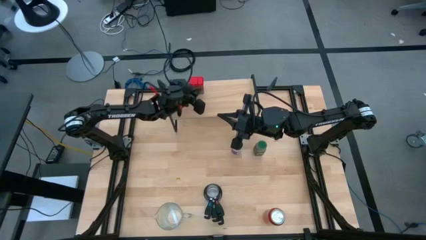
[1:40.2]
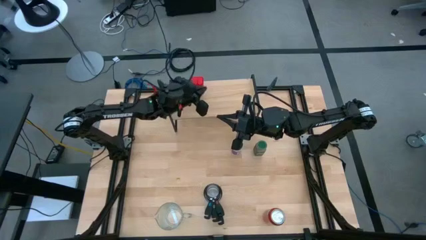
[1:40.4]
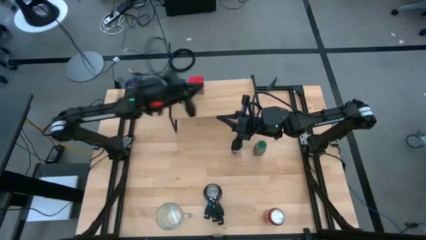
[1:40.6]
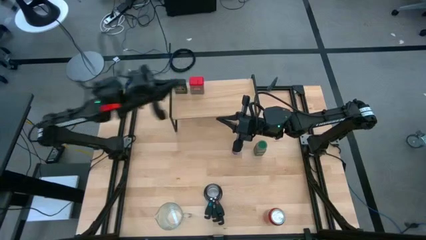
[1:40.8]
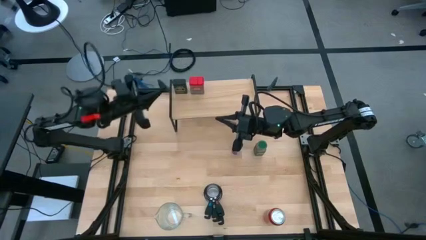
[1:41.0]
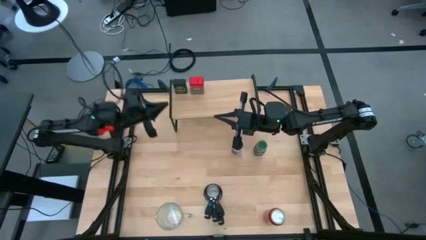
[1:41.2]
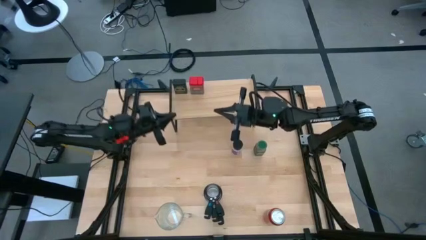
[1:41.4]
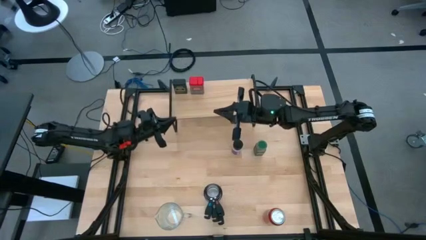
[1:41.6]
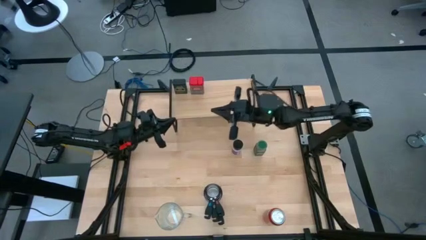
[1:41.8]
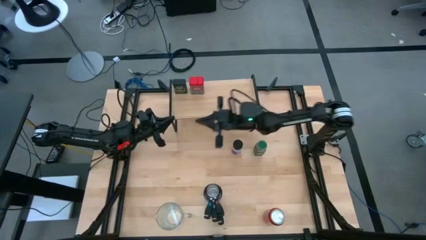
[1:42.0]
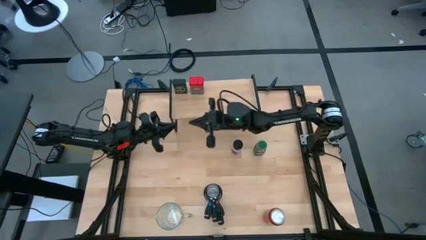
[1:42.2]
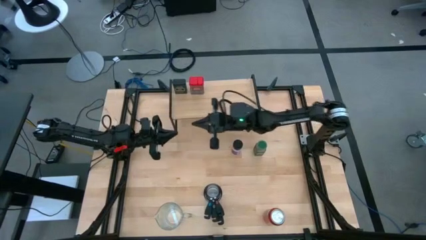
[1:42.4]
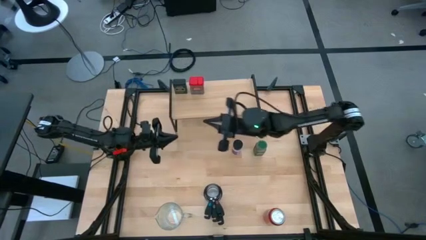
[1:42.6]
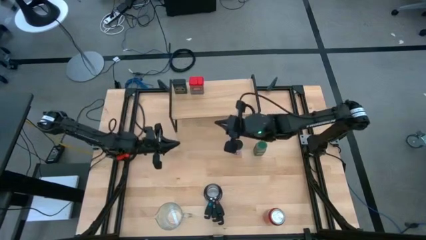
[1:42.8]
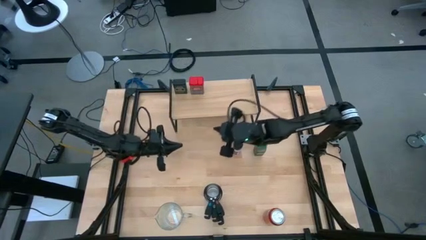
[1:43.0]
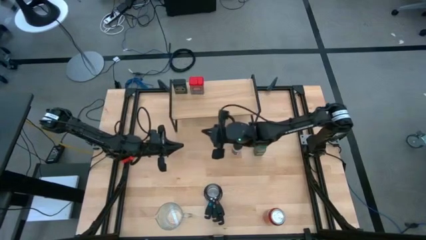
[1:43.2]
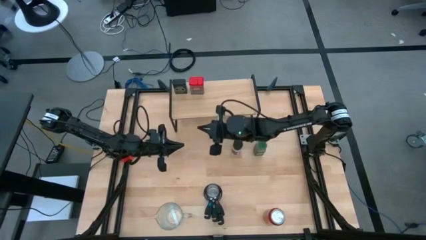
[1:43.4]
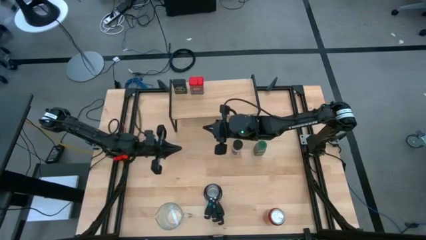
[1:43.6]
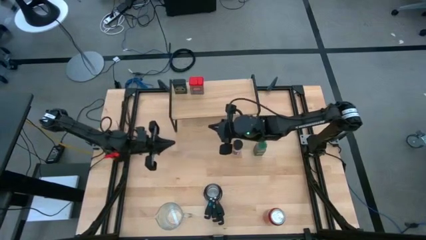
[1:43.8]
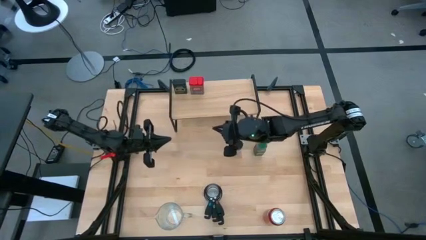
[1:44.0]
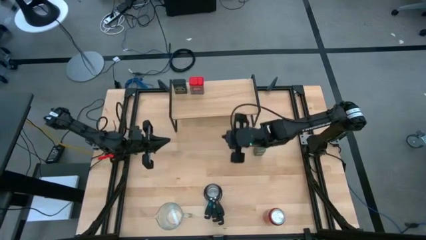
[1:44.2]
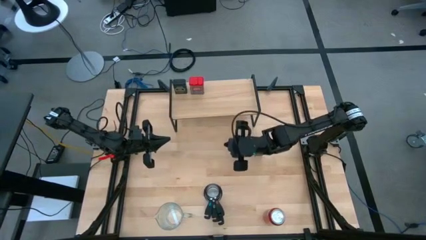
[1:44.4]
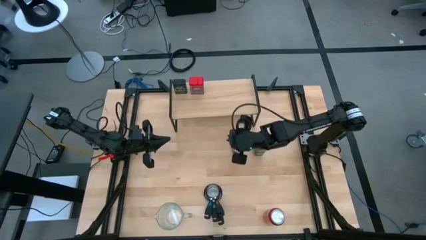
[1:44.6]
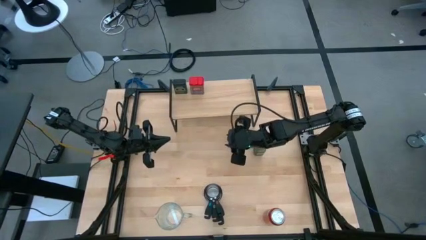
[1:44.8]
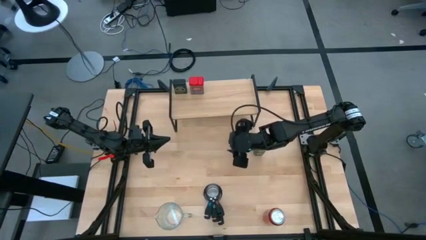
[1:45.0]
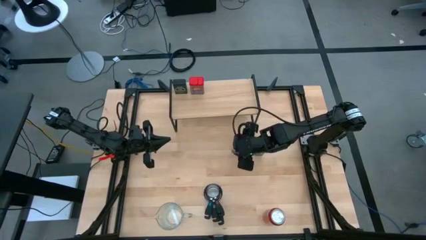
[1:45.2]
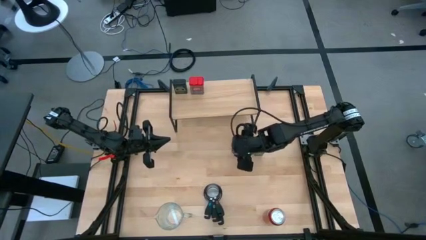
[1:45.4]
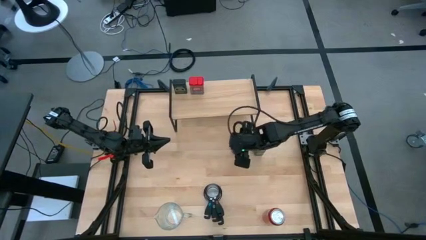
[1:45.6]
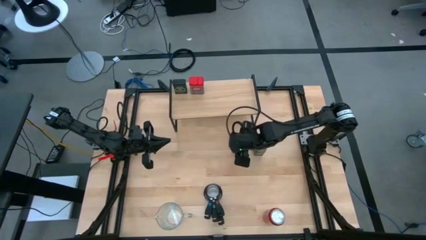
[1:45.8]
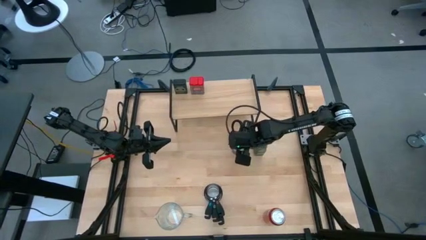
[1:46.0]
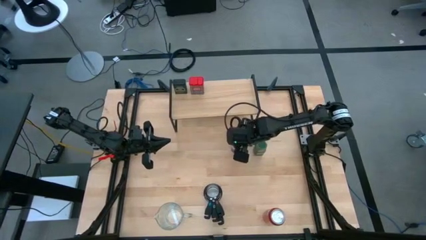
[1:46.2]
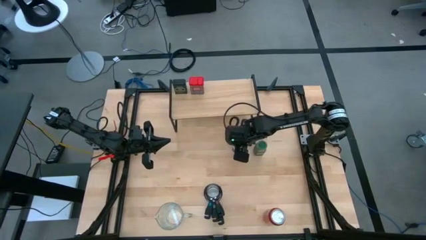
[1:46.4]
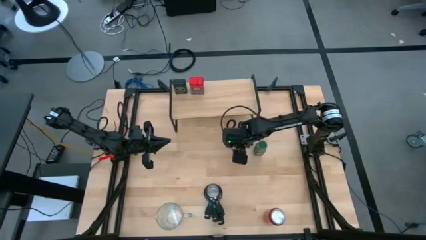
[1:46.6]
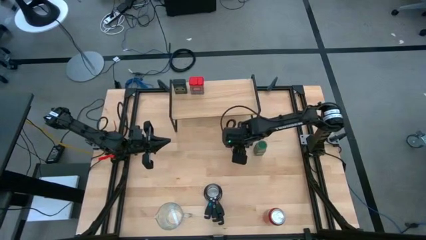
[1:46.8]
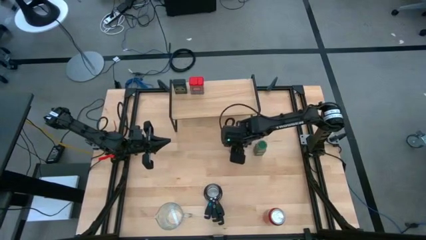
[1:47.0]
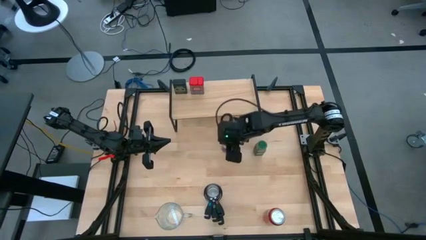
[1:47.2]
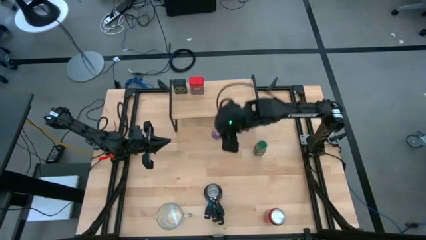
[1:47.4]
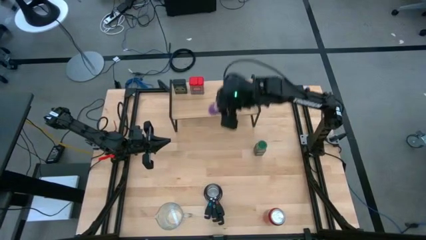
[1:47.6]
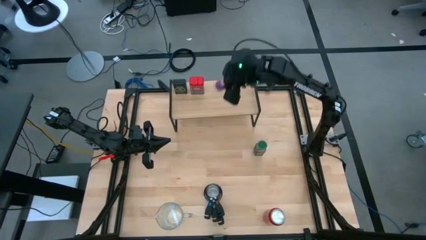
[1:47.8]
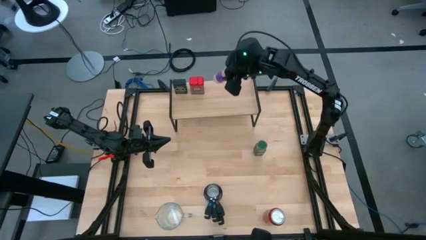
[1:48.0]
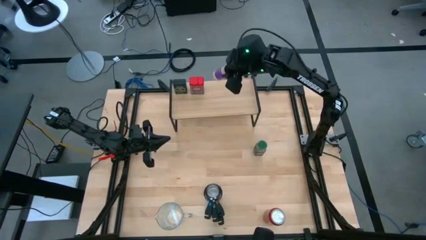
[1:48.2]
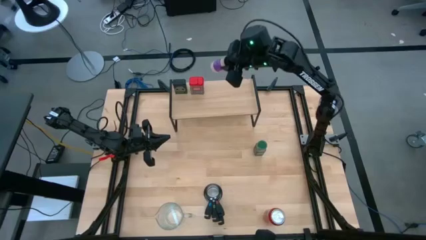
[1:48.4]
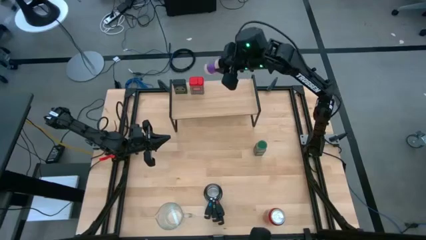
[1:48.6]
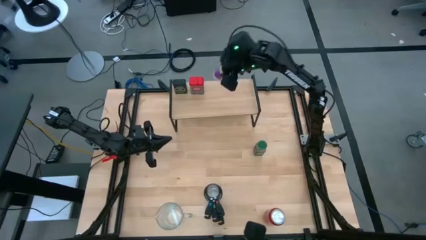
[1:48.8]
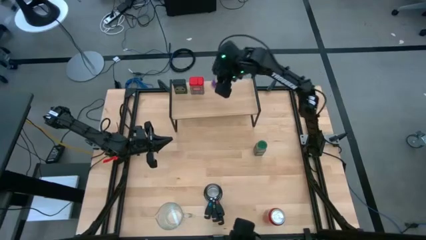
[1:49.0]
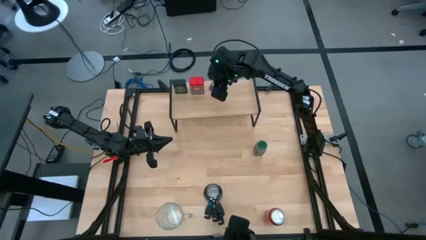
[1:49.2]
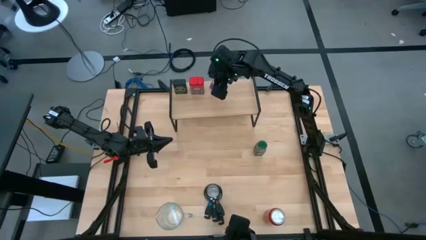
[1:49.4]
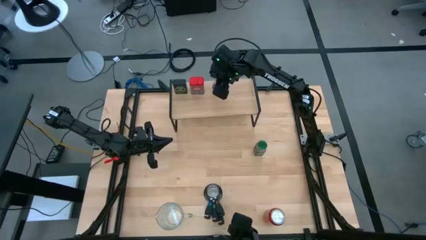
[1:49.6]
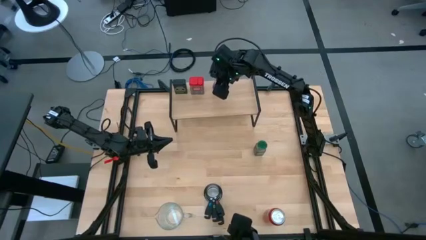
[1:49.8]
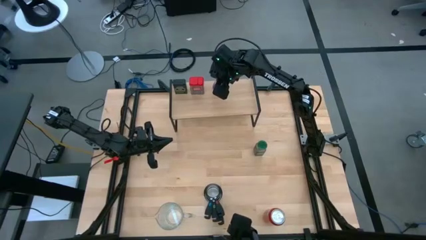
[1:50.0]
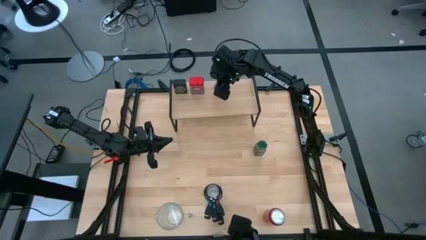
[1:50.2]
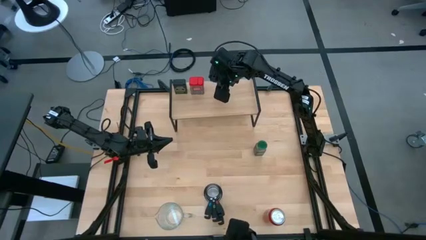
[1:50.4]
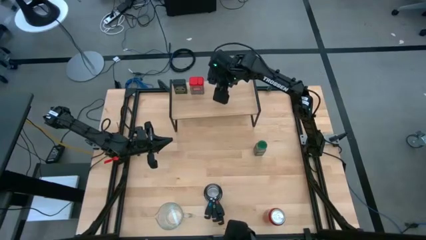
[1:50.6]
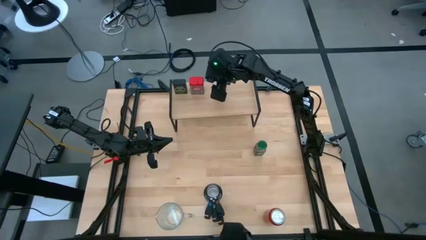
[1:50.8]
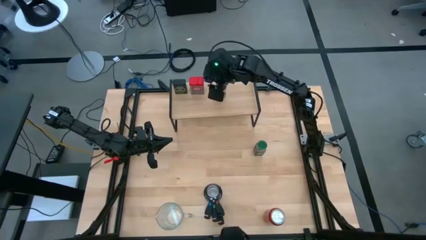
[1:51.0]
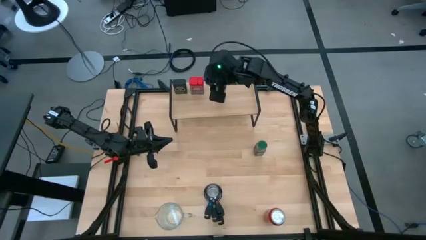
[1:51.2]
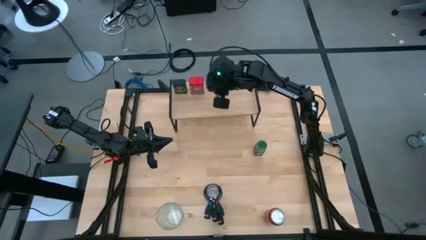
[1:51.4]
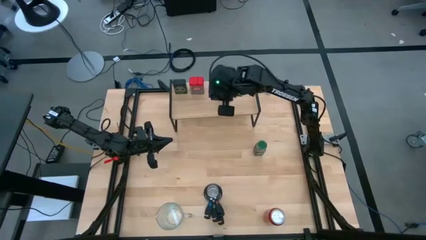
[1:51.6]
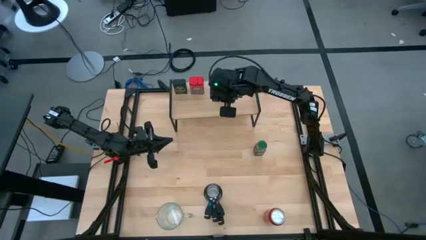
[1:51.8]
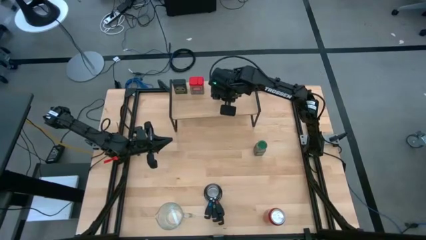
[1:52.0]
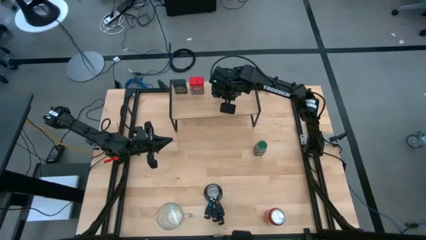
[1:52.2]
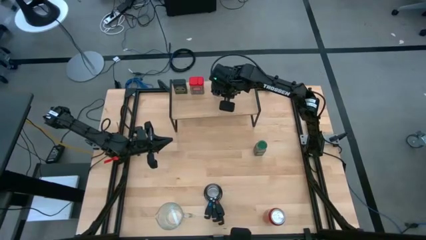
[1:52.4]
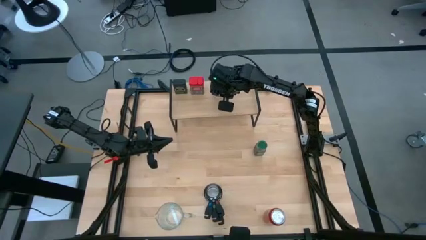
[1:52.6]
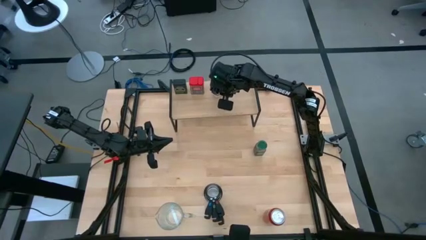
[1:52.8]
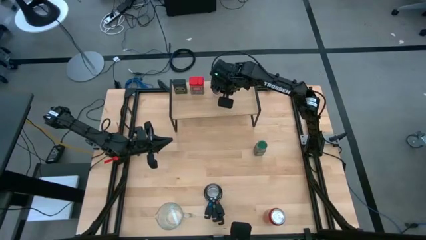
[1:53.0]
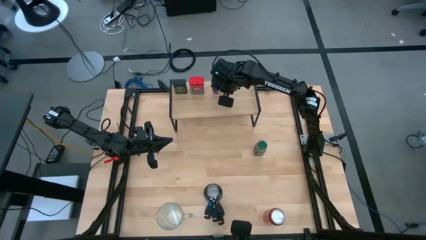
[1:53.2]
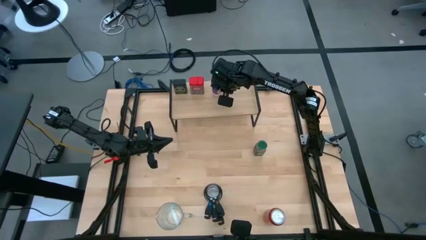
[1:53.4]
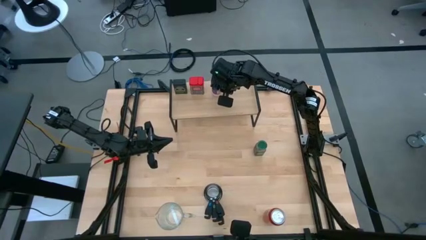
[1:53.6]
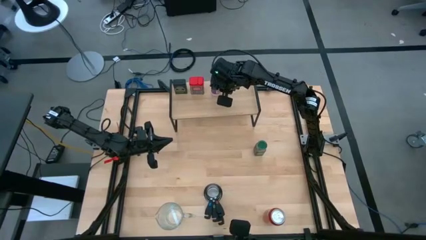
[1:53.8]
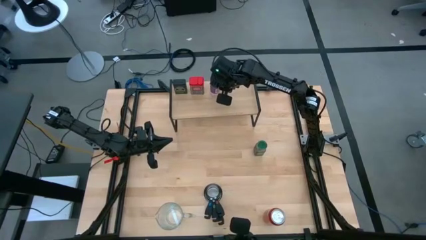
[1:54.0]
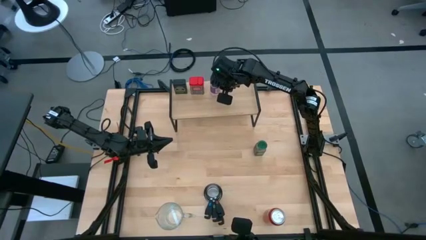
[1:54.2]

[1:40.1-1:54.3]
Task: Shelf spices
Put the black seasoning bottle on the shelf

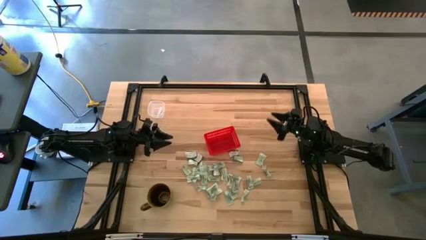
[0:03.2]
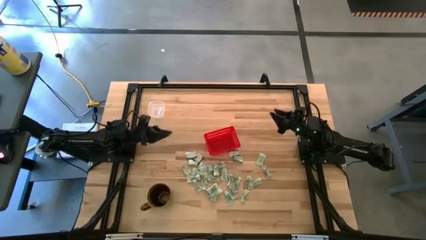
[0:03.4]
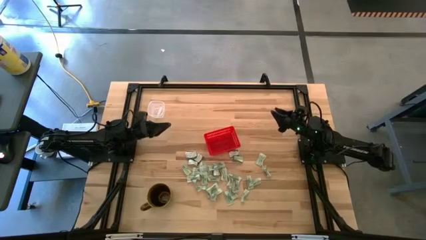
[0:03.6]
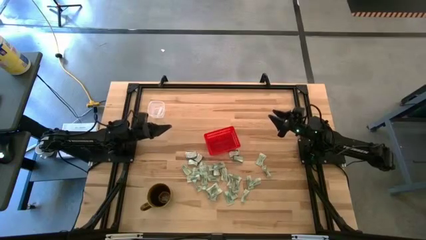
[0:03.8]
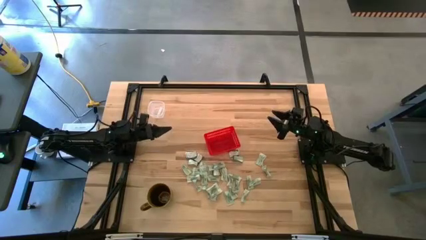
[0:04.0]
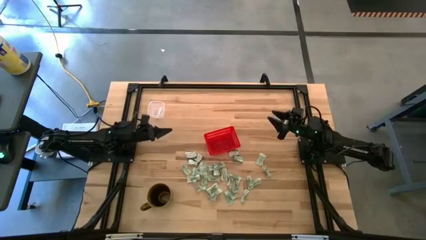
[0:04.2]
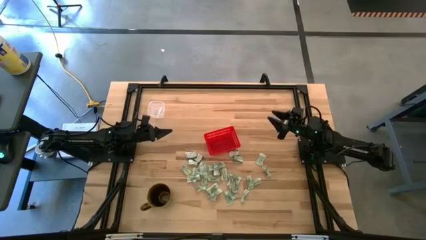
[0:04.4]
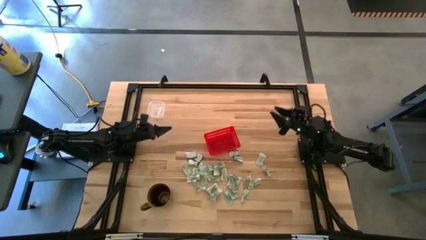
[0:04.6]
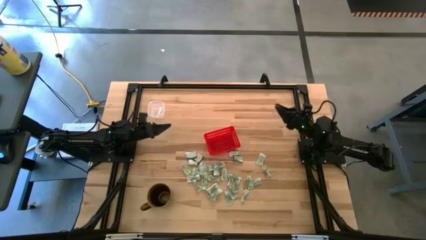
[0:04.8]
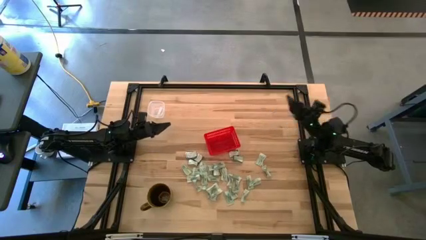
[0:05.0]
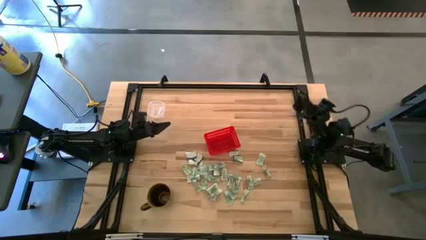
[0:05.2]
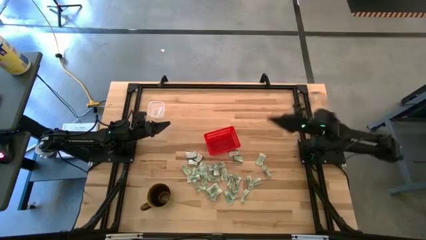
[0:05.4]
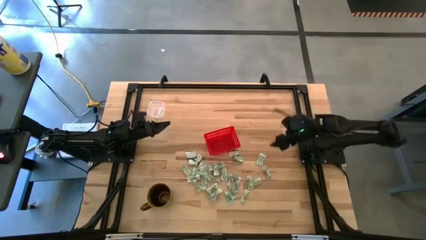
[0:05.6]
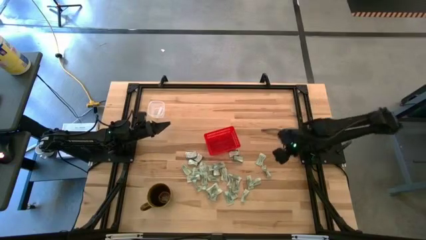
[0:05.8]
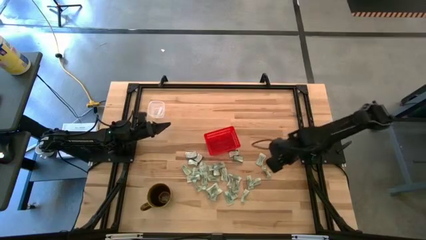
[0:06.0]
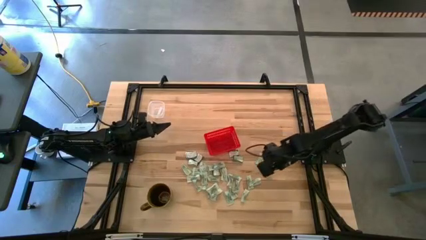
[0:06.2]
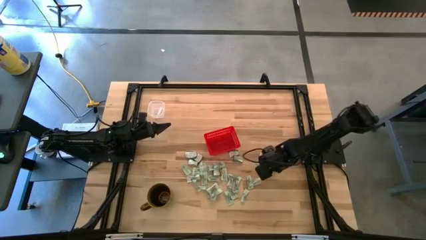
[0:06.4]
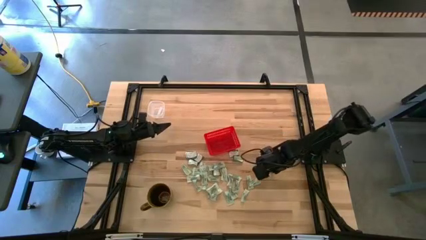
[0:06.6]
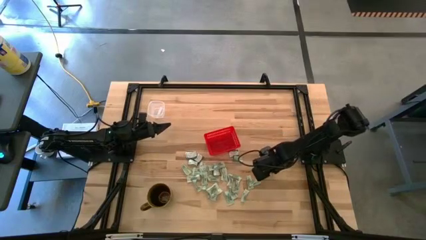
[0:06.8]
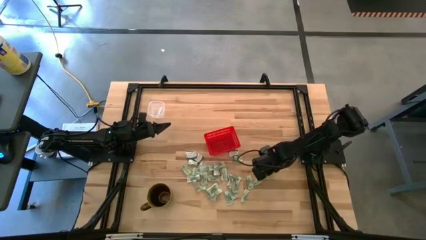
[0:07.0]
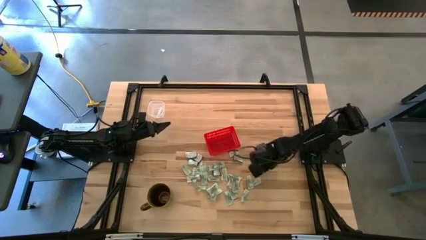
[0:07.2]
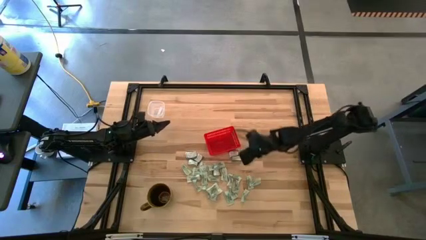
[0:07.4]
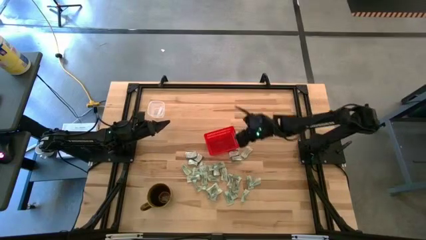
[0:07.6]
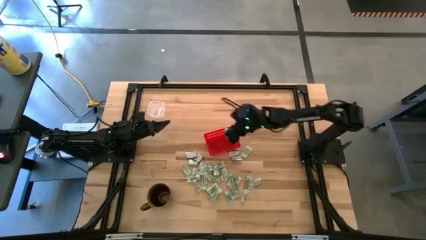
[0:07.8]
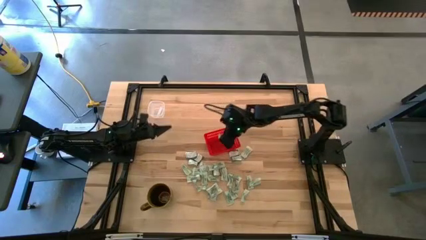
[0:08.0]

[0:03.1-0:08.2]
Task: Pick and place items into bin
Put the green stevia packet into the red bin
